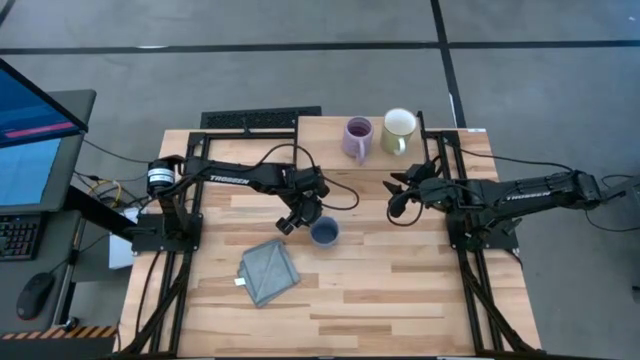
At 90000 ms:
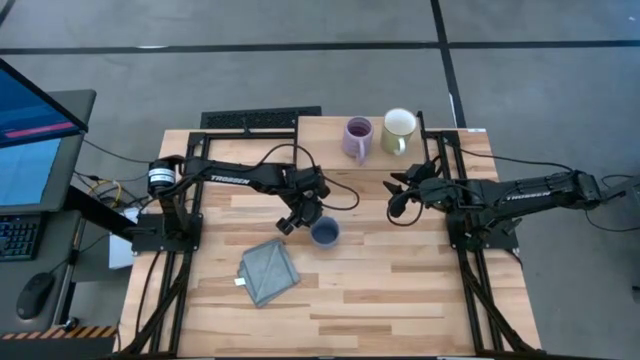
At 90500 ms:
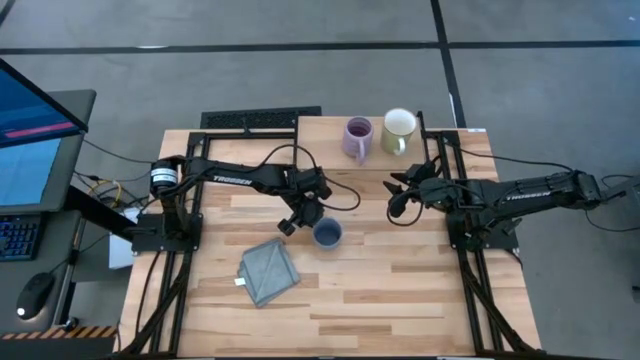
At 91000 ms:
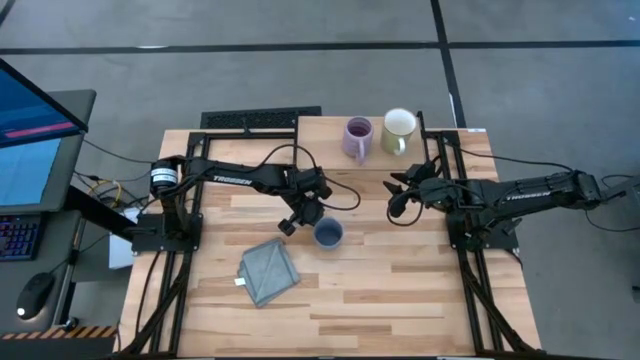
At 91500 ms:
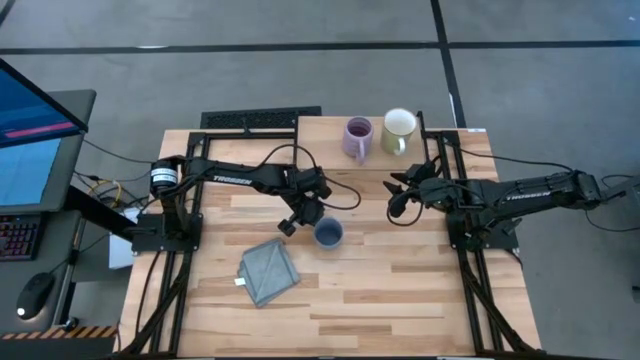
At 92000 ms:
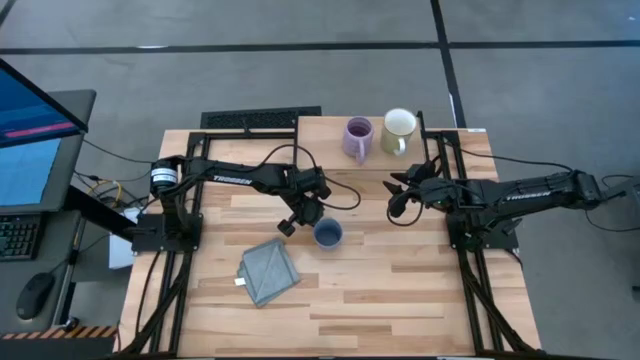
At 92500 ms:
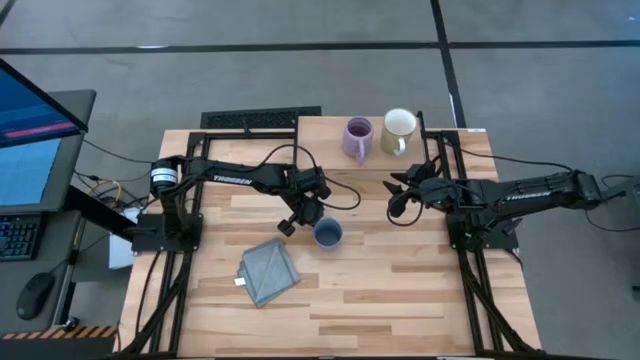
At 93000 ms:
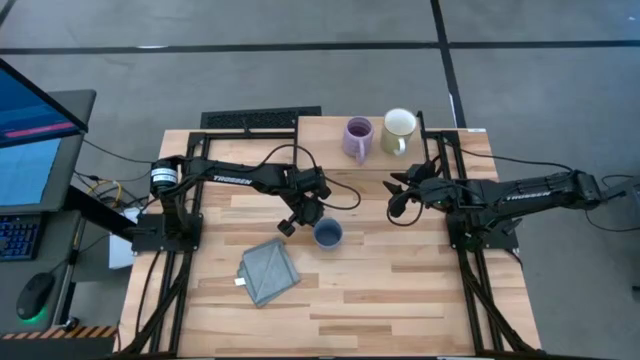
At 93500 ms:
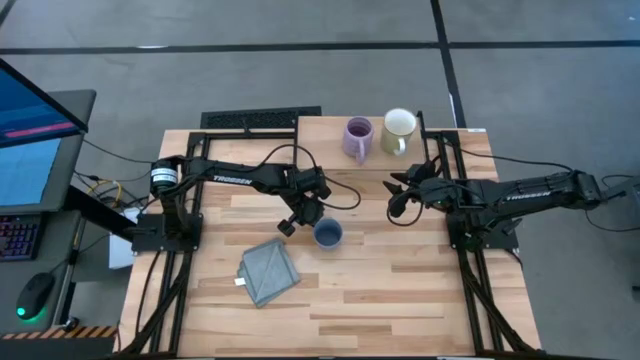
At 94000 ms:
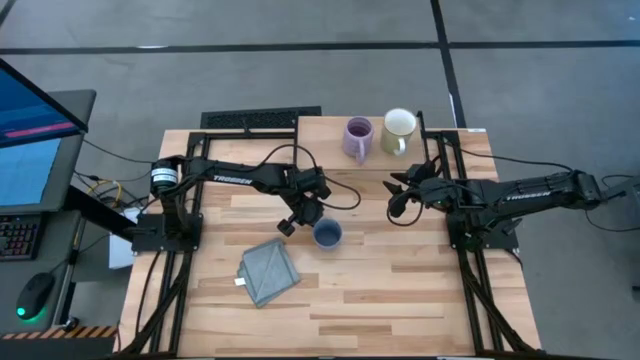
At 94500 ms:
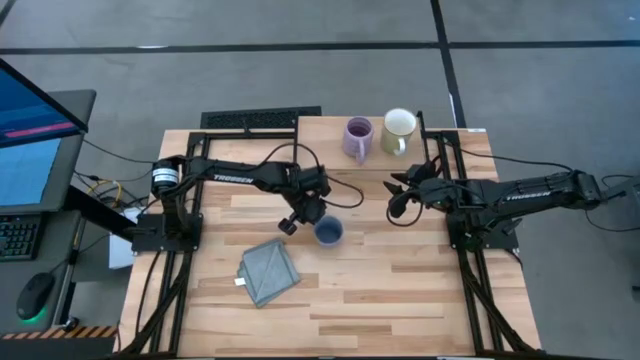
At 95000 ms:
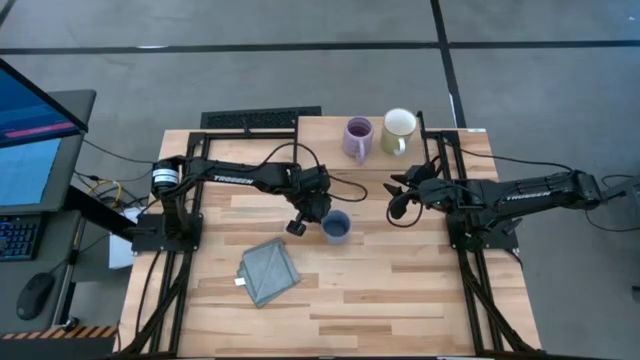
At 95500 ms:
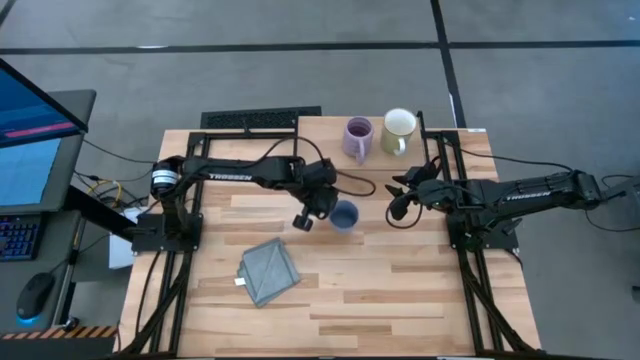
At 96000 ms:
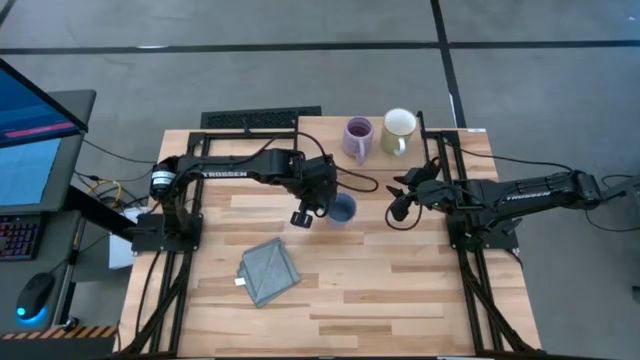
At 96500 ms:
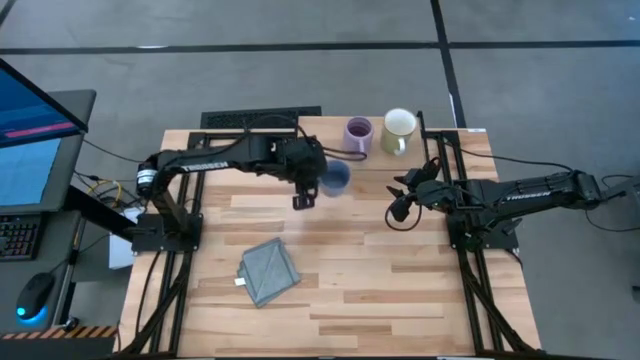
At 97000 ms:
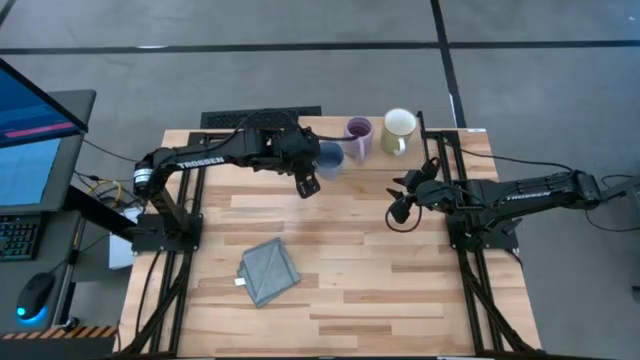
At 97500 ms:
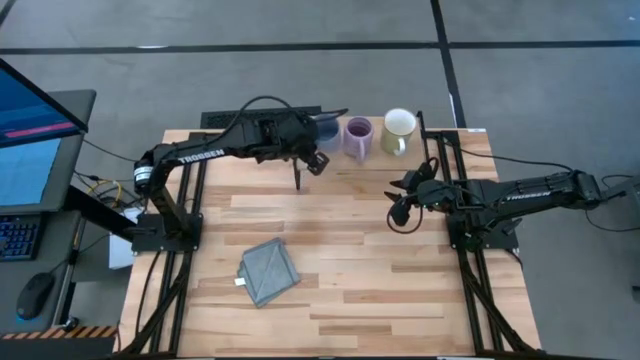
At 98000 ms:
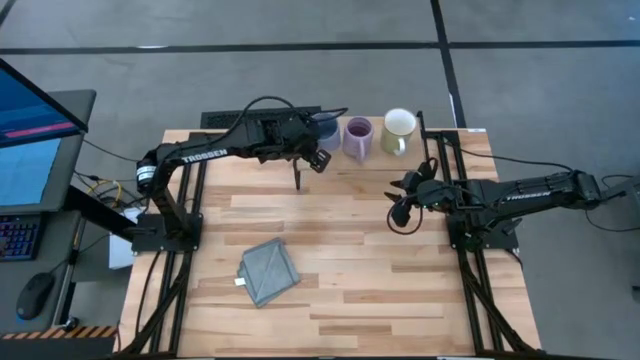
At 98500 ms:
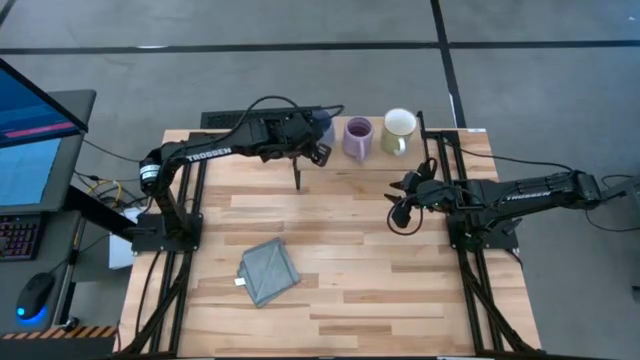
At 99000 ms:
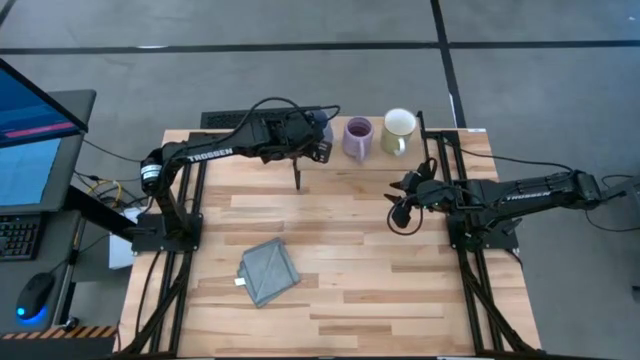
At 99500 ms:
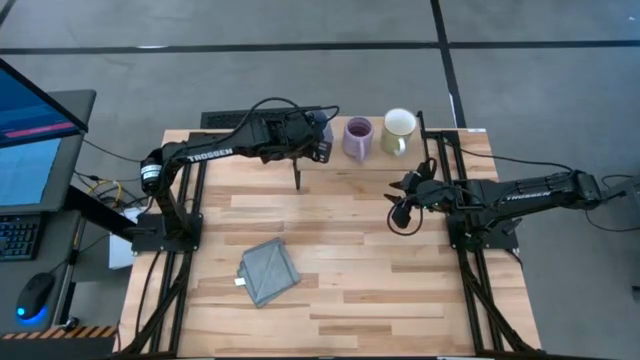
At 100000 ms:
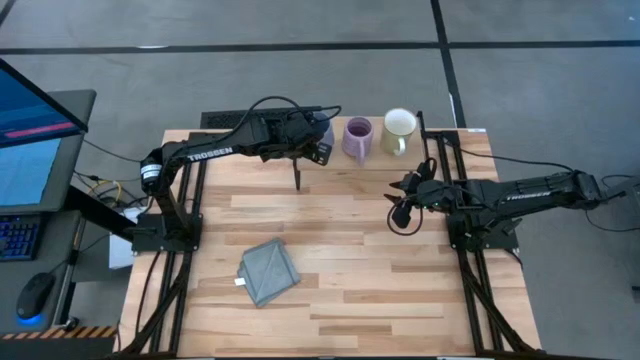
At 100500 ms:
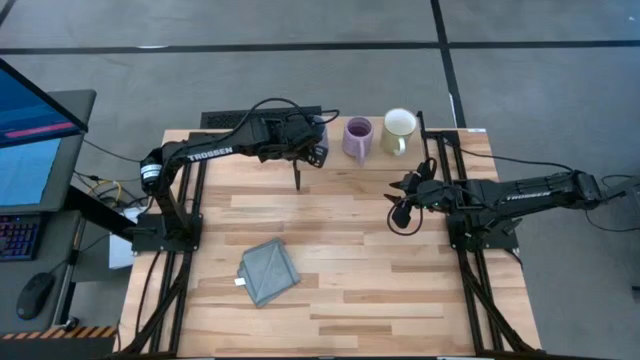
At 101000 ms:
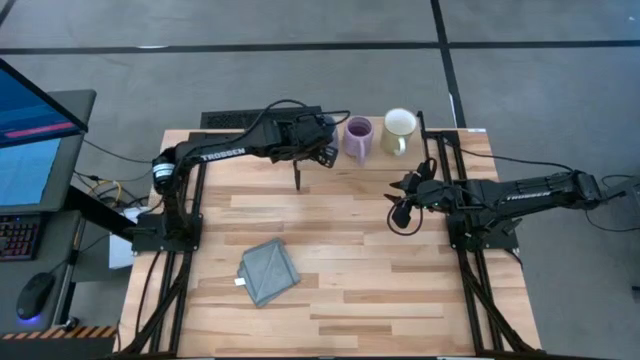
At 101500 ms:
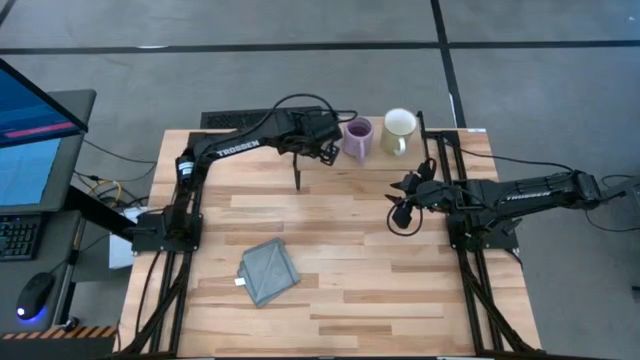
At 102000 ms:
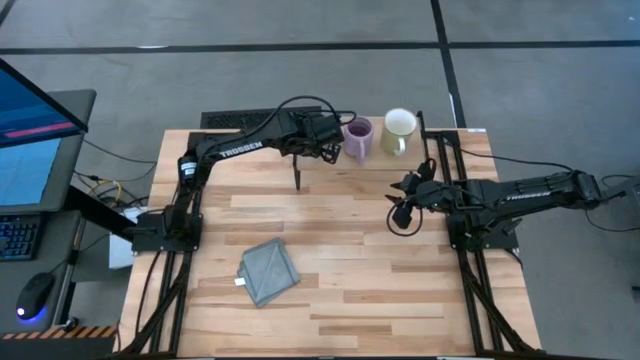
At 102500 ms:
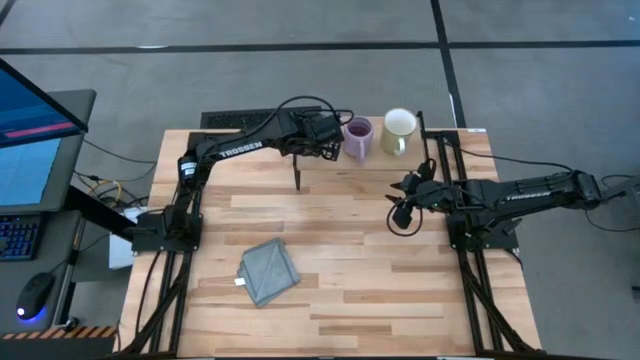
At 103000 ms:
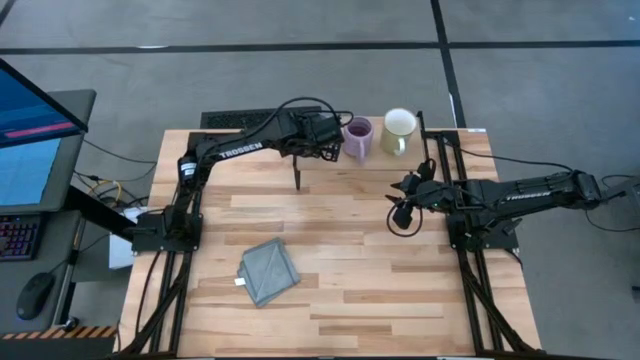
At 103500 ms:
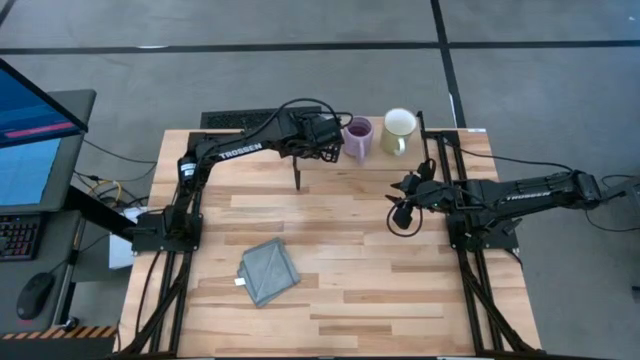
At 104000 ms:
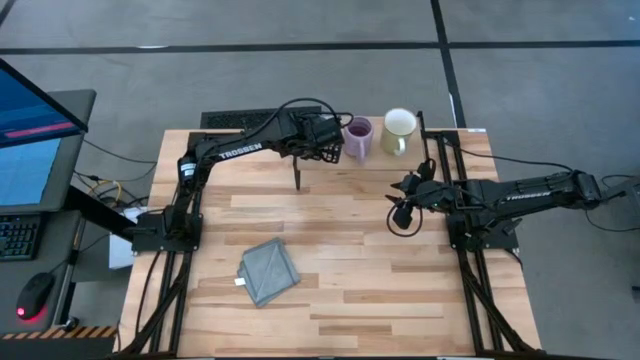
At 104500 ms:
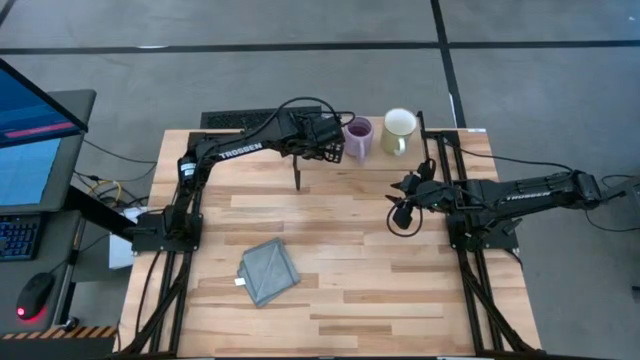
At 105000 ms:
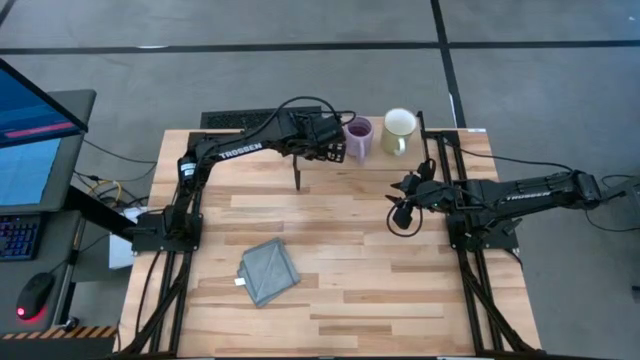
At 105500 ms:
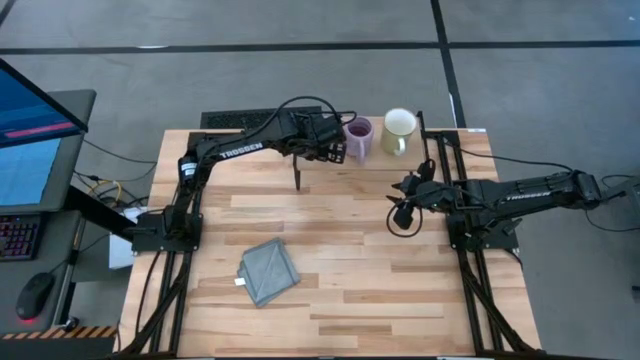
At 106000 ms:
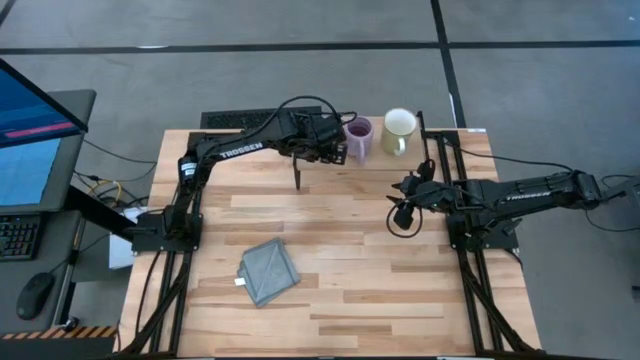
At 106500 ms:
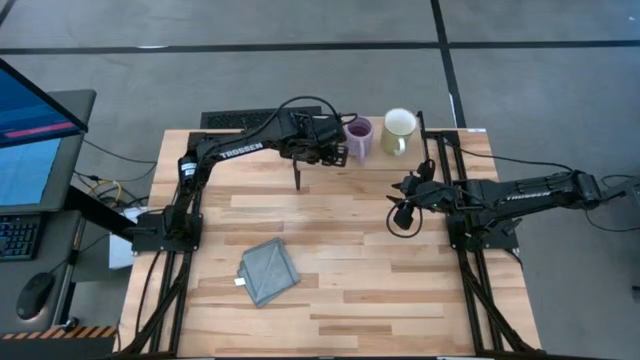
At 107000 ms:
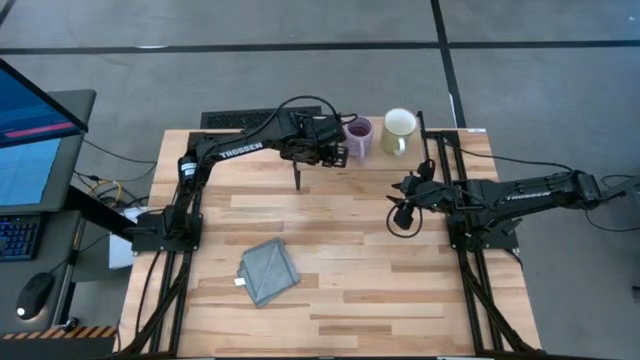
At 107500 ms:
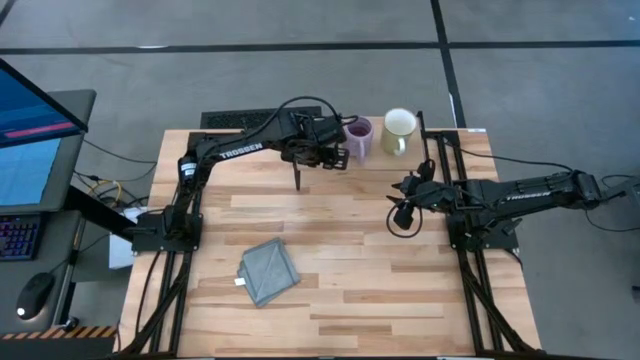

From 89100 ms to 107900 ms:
Task: Stack small to large cups/mugs on shelf
Put the blue mug on the shelf
